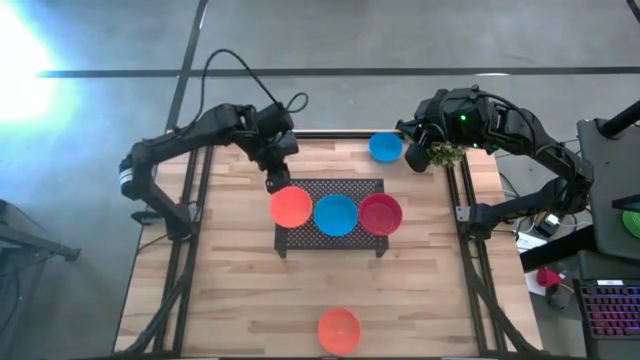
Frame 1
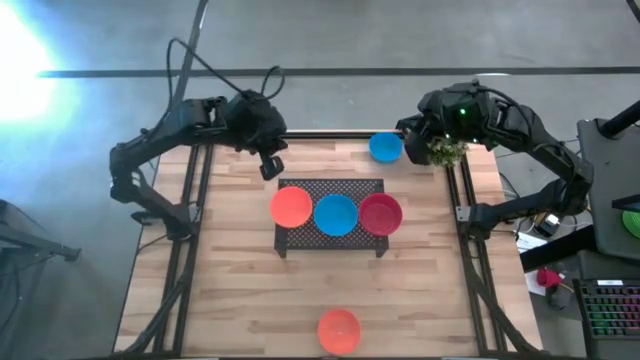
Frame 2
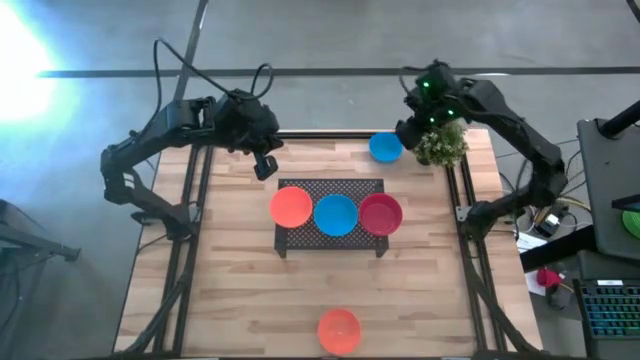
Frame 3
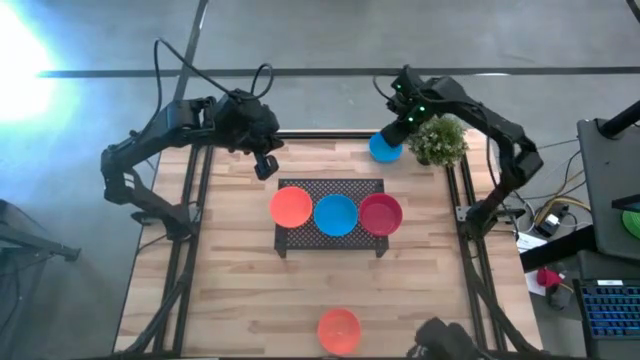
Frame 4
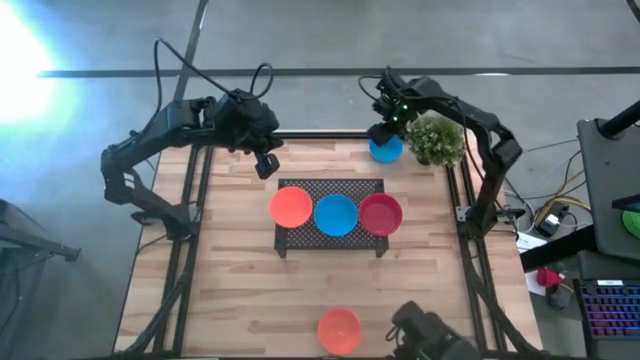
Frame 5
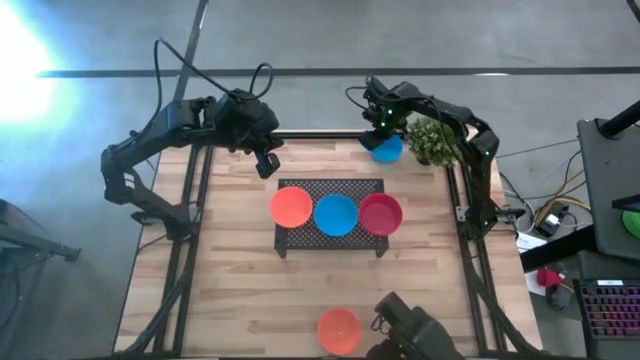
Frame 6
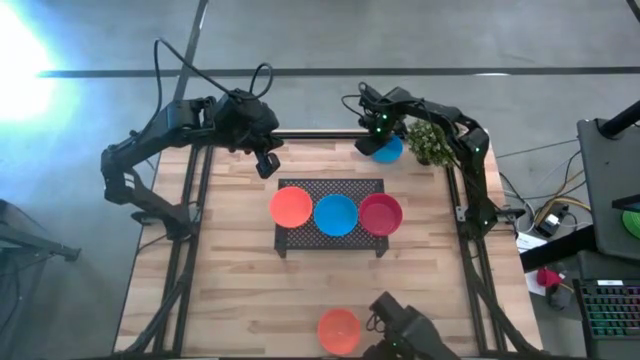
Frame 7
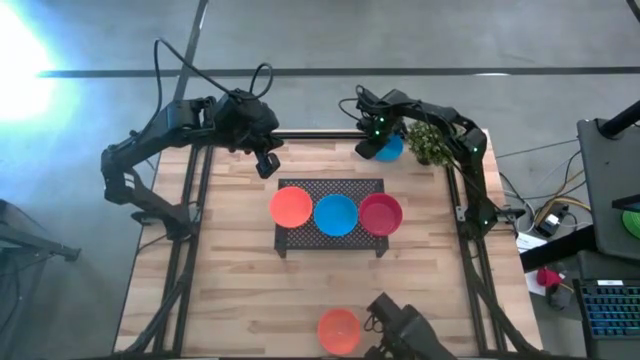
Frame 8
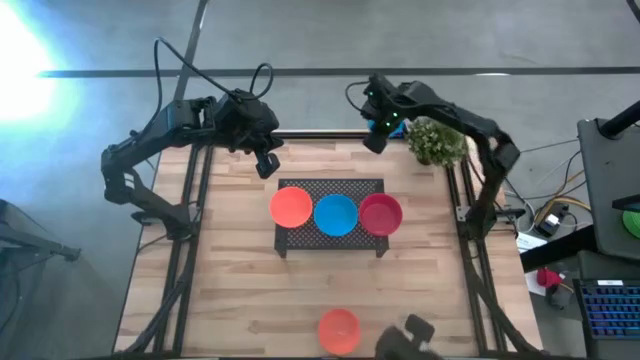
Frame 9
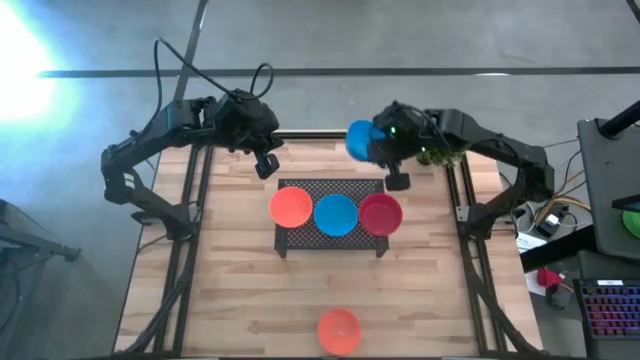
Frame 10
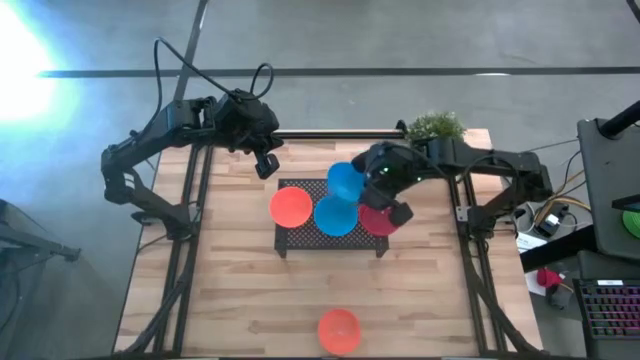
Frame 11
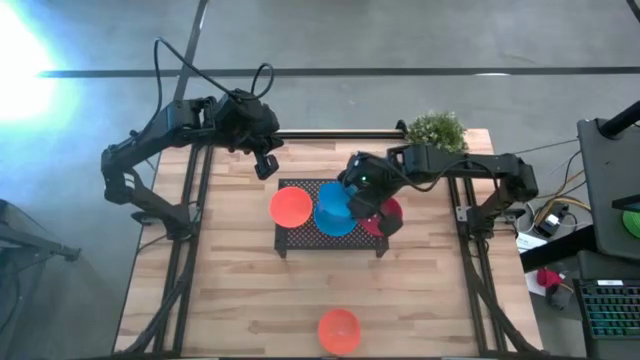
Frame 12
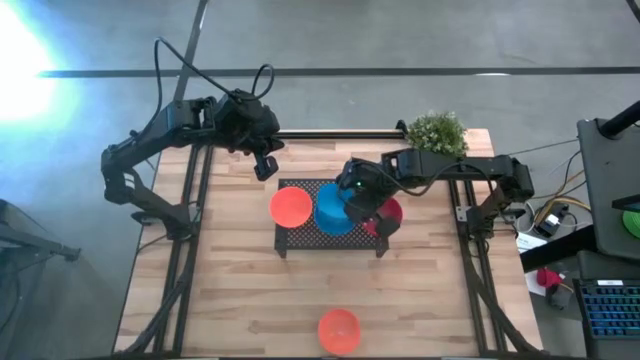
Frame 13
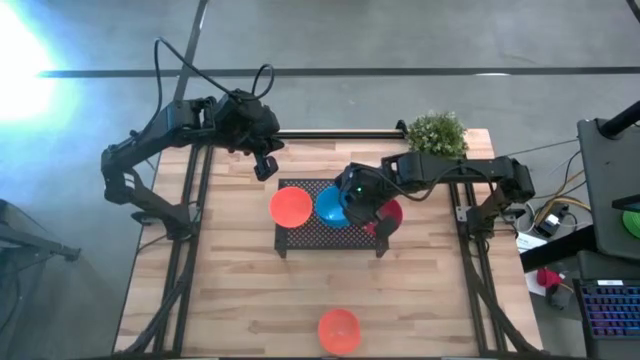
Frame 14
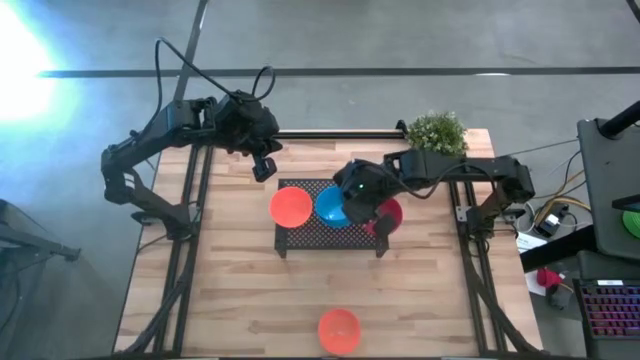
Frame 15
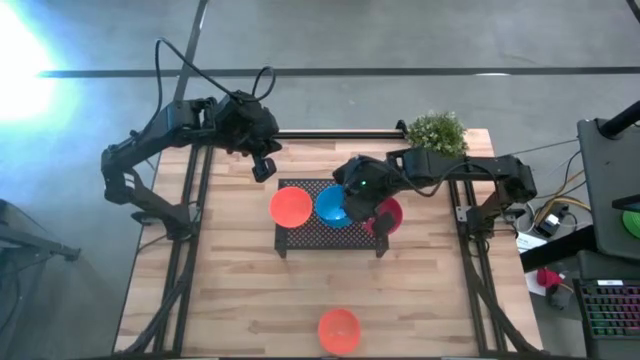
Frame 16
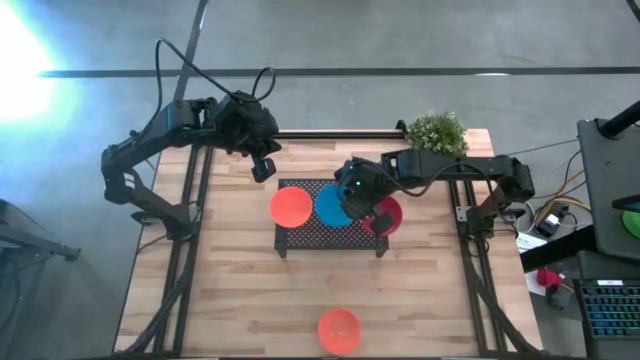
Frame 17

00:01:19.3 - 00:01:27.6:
Task: Pick & Place Mini bowls
Stack the blue bowl on top of the blue bowls on the shelf

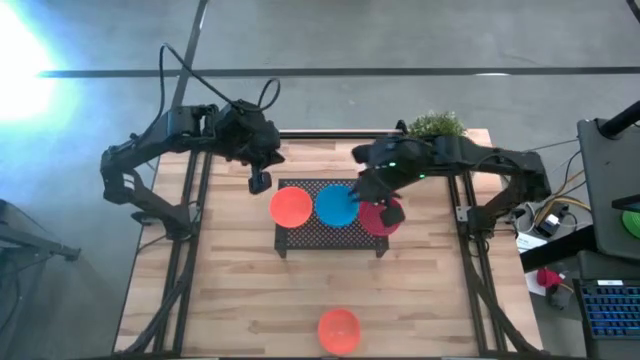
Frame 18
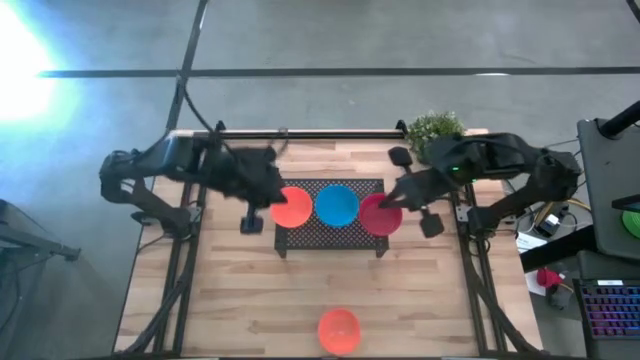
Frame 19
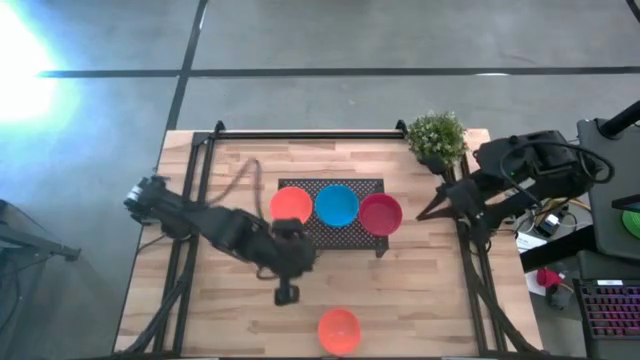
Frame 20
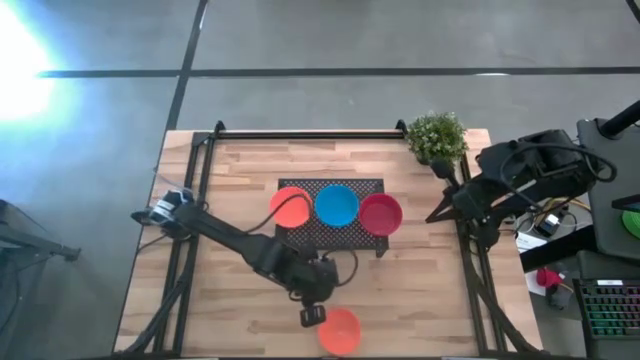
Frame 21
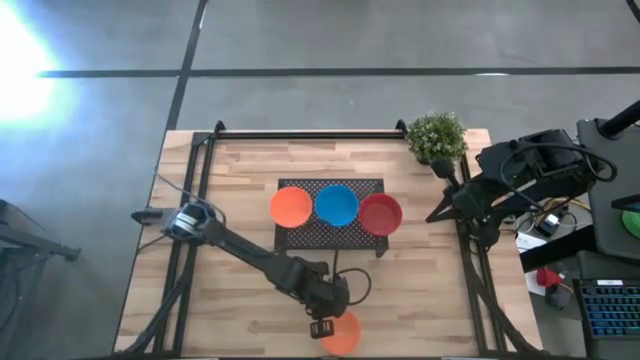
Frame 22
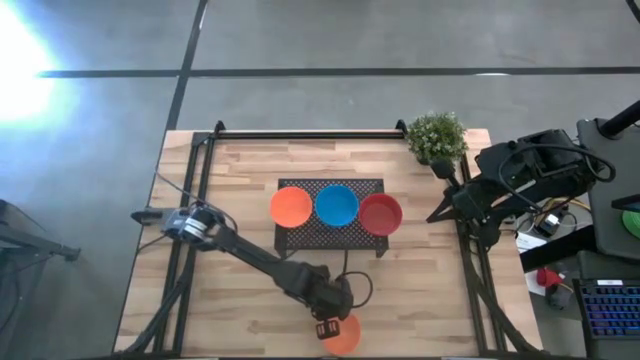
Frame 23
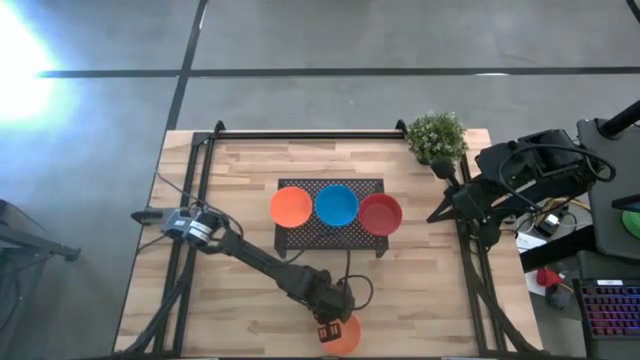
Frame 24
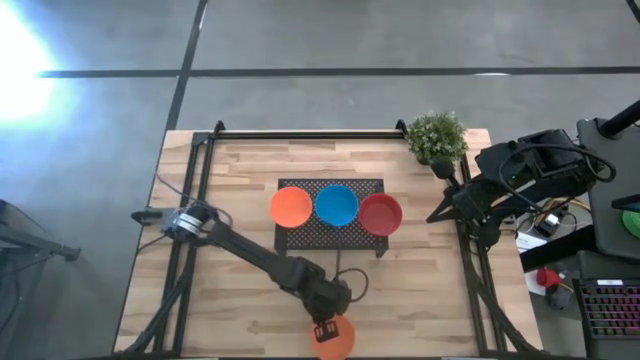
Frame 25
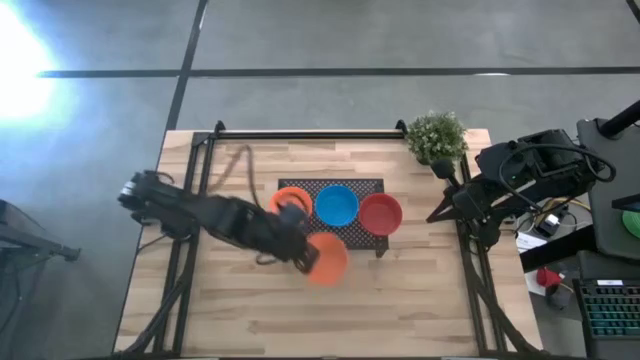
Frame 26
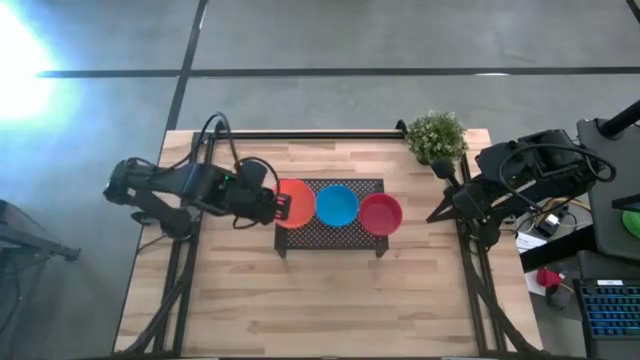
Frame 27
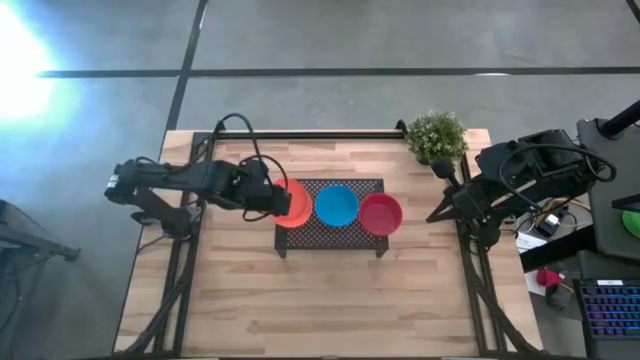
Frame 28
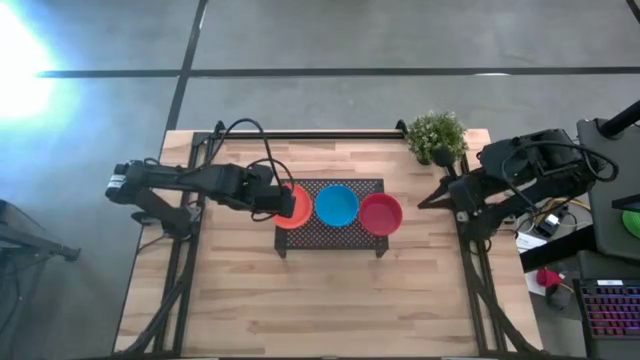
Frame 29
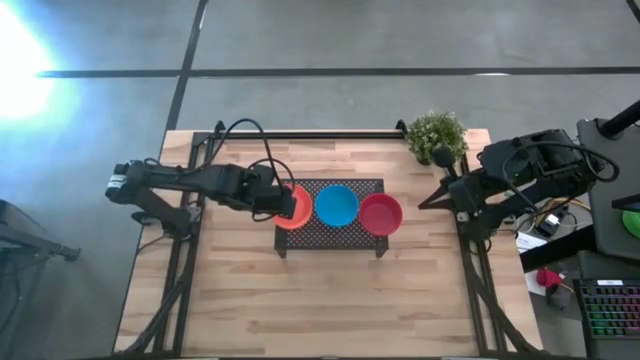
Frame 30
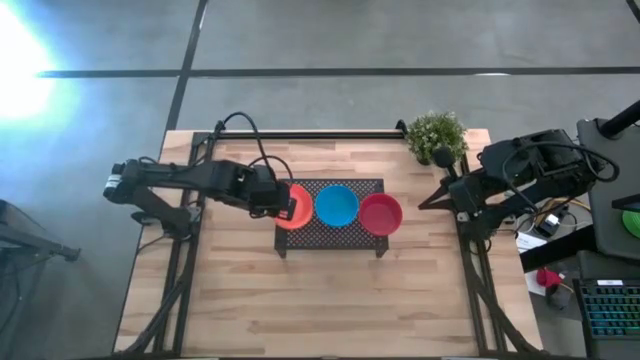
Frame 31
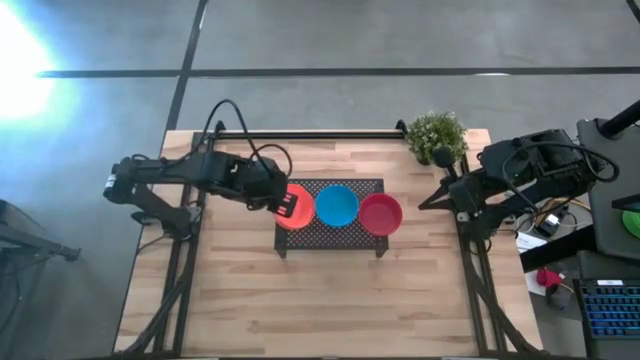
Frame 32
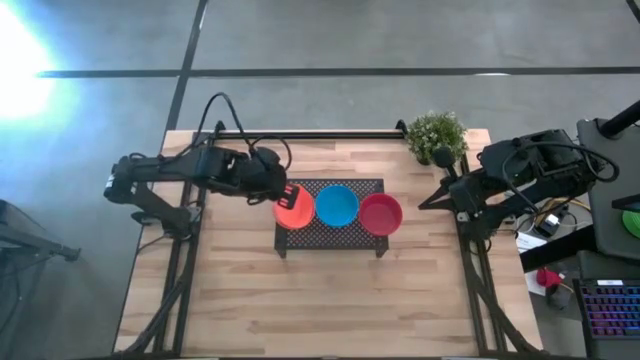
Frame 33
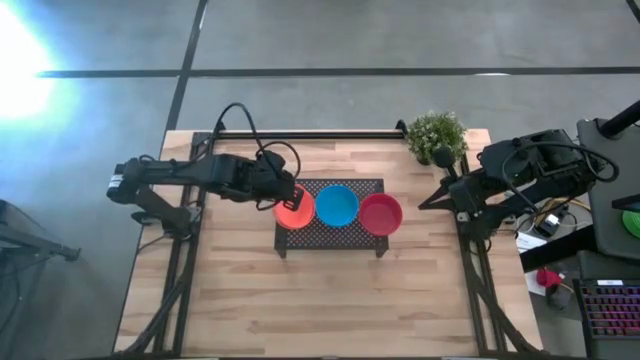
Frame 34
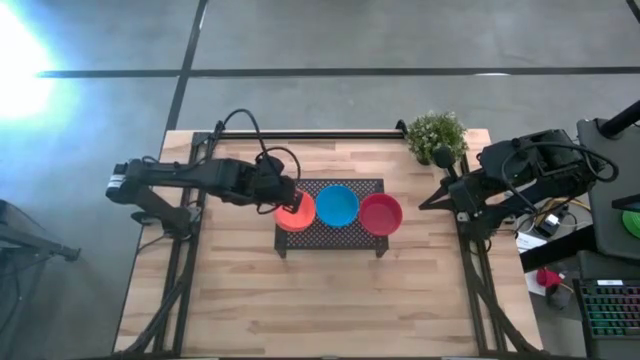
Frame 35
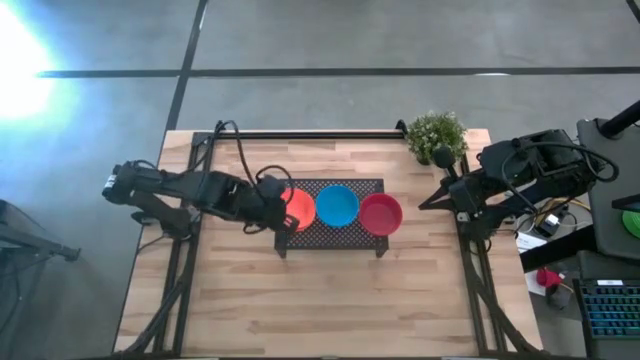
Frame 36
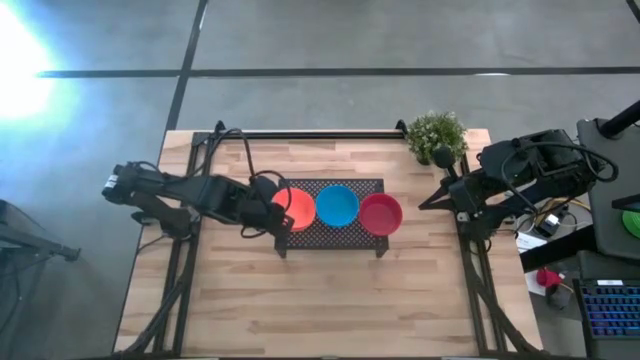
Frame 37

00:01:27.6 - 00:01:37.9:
Stack the orange bowl on top of the orange bowls on the shelf

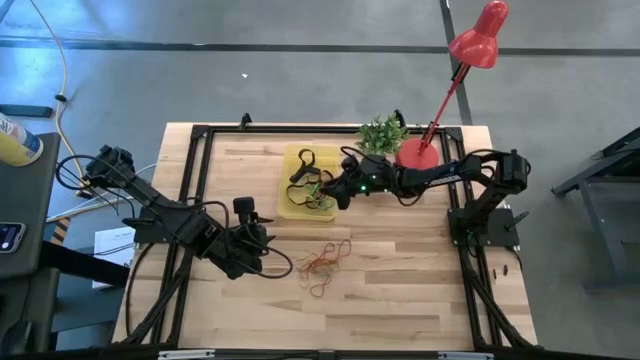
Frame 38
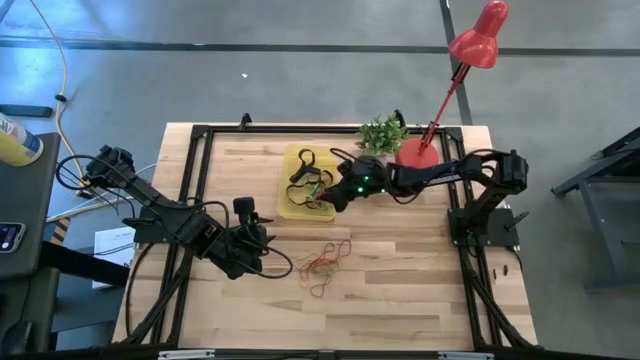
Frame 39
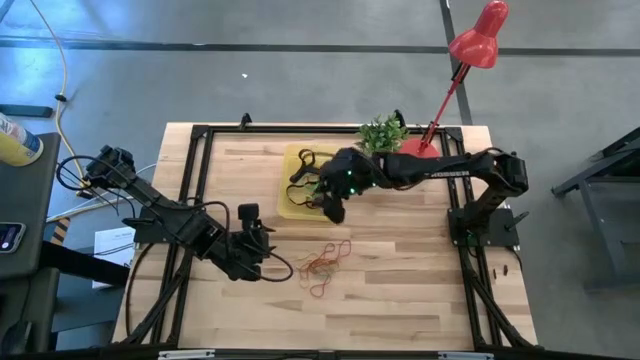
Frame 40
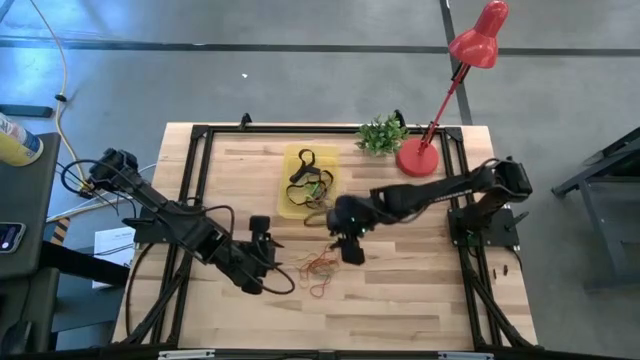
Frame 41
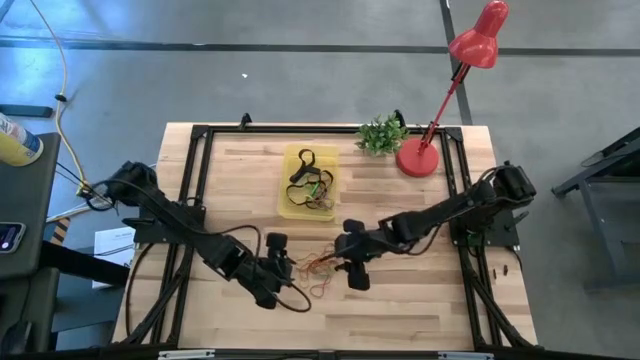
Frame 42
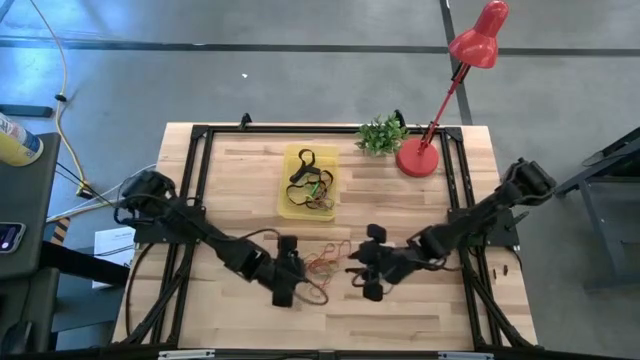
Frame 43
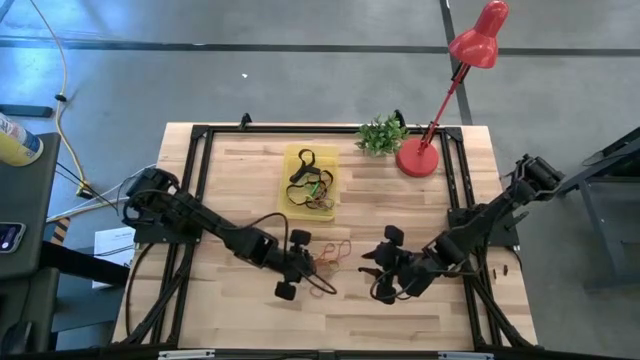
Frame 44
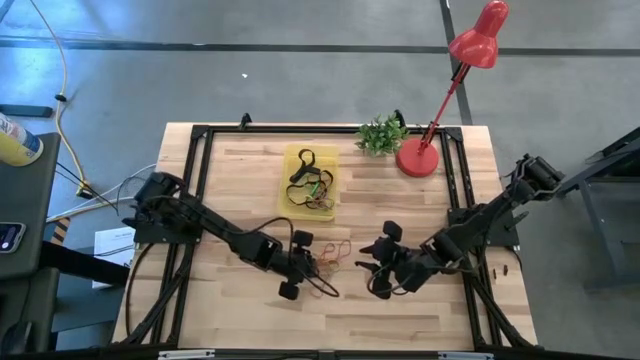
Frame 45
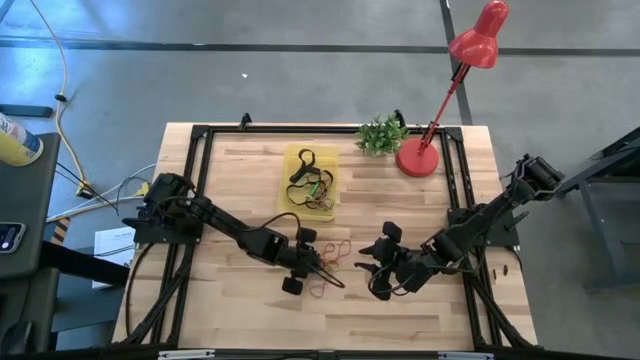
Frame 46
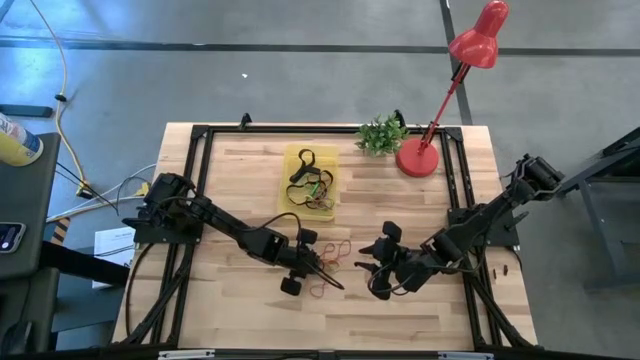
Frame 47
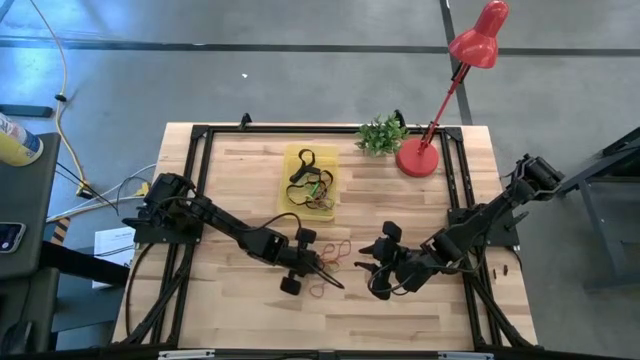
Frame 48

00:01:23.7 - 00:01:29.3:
Task: Pick and place rubber bands into bin
Put the red rubber band into the yellow bin
